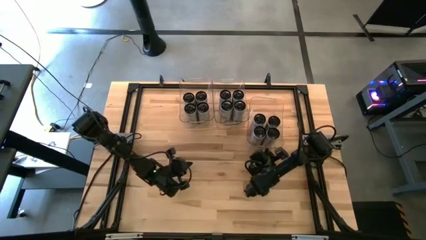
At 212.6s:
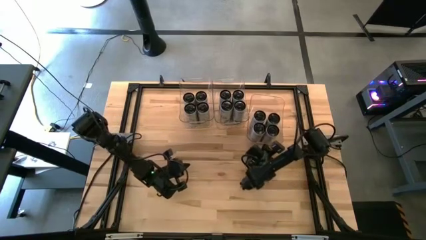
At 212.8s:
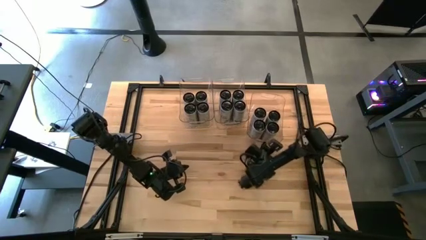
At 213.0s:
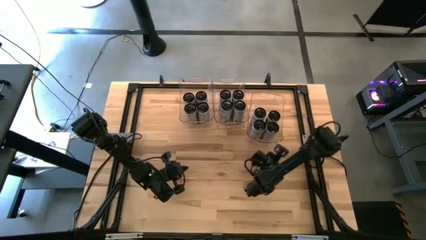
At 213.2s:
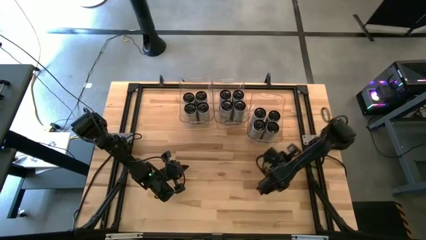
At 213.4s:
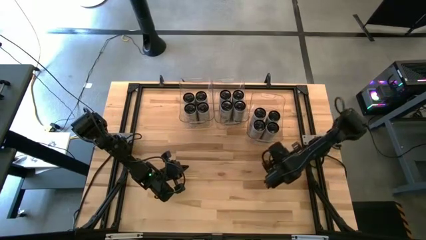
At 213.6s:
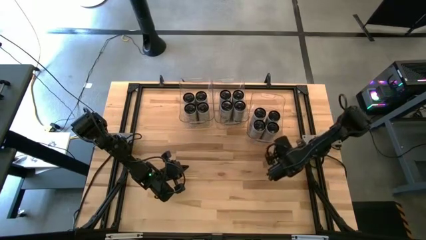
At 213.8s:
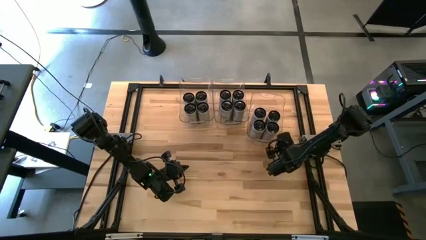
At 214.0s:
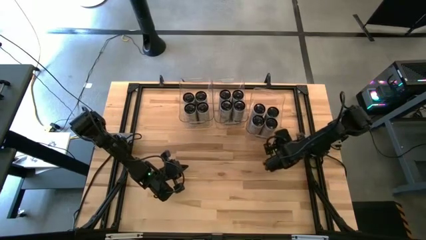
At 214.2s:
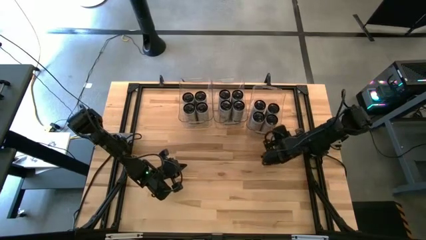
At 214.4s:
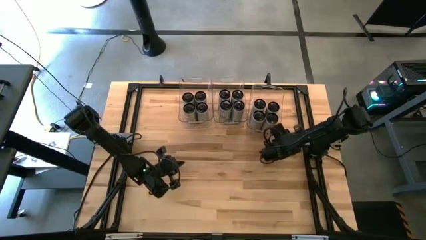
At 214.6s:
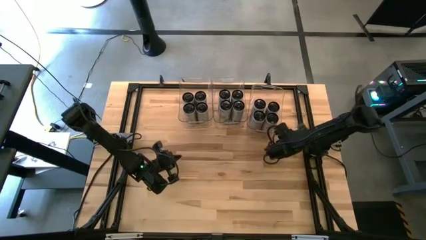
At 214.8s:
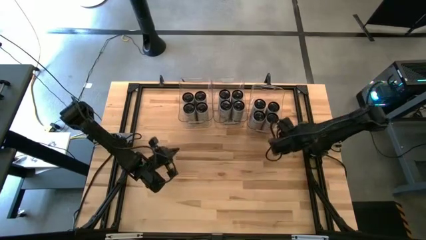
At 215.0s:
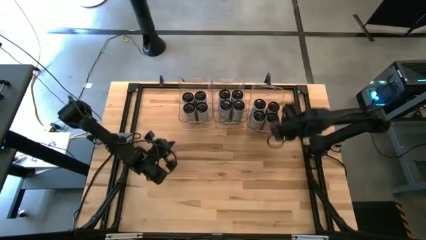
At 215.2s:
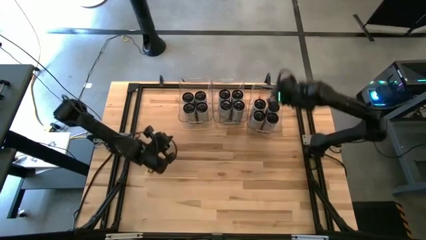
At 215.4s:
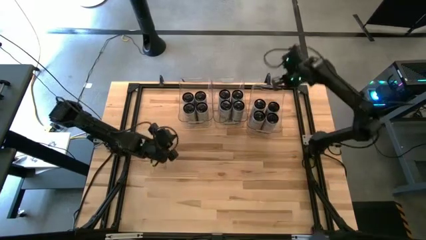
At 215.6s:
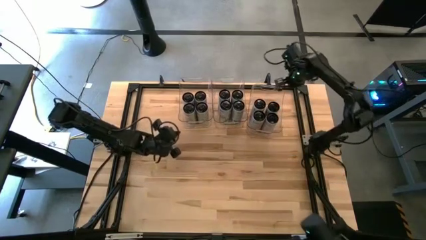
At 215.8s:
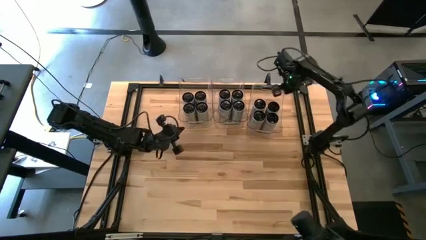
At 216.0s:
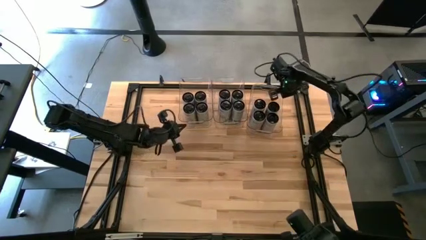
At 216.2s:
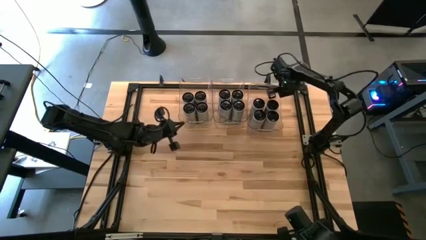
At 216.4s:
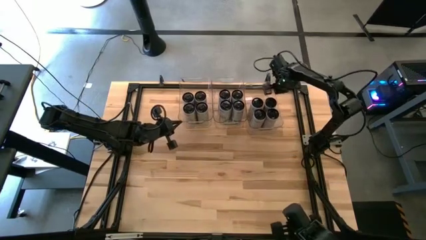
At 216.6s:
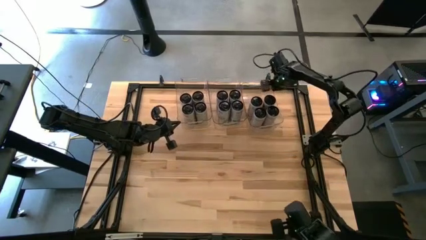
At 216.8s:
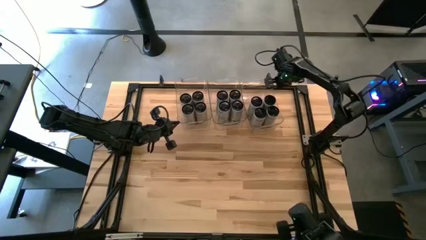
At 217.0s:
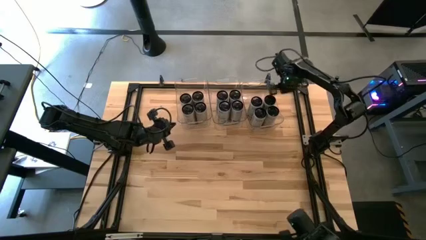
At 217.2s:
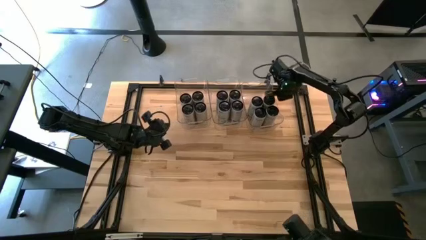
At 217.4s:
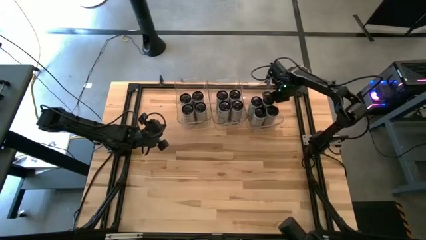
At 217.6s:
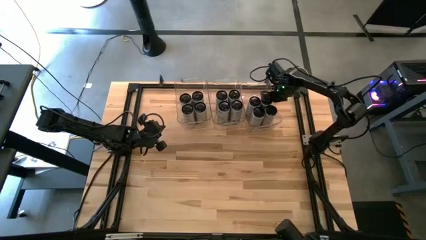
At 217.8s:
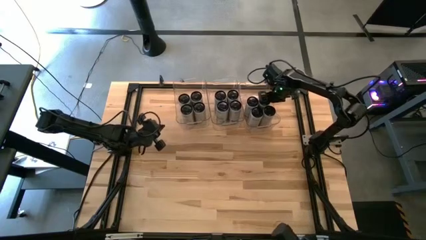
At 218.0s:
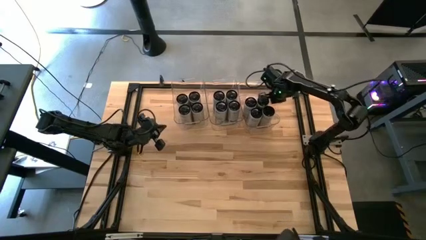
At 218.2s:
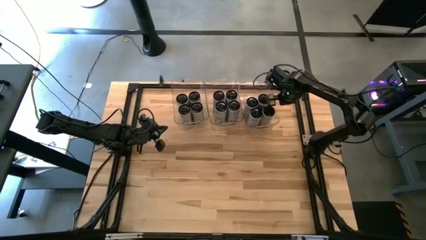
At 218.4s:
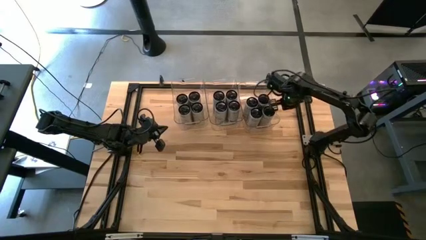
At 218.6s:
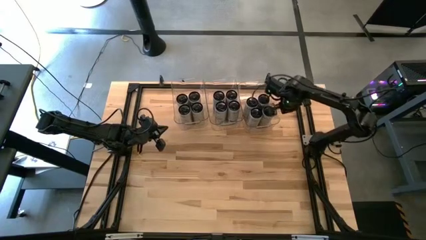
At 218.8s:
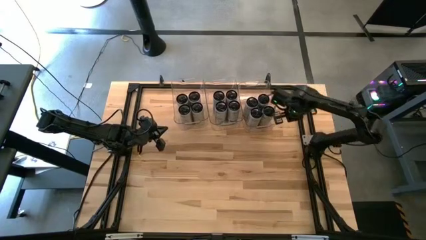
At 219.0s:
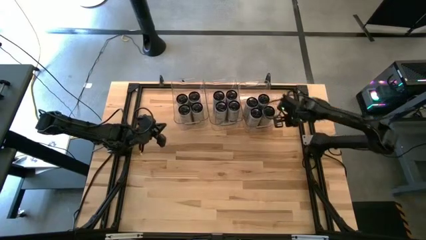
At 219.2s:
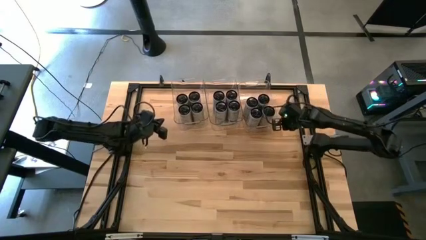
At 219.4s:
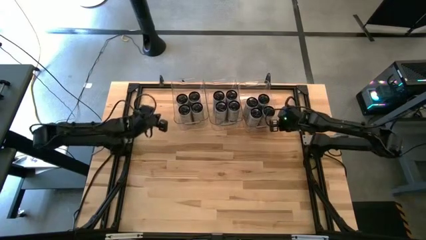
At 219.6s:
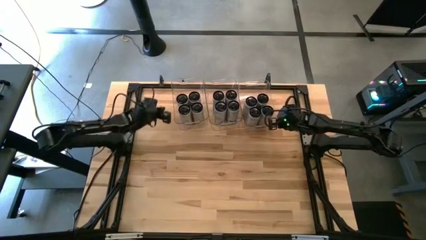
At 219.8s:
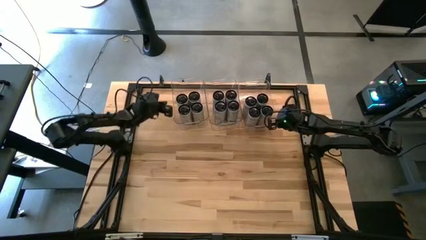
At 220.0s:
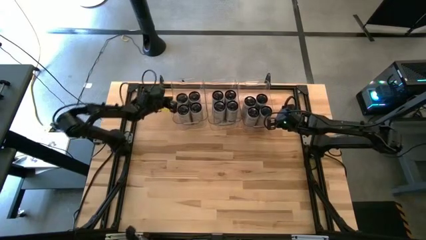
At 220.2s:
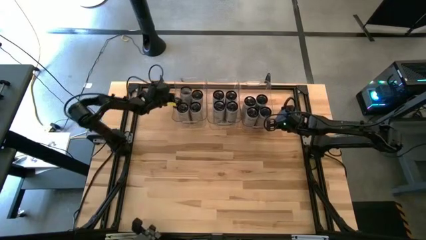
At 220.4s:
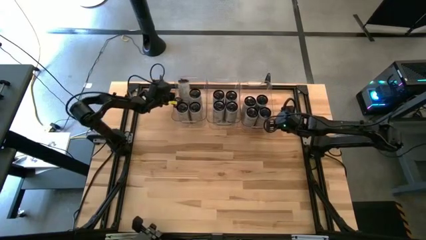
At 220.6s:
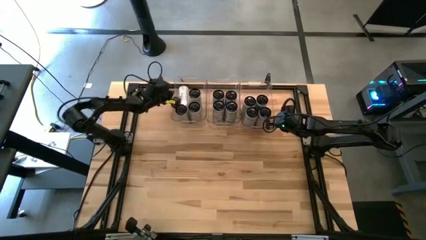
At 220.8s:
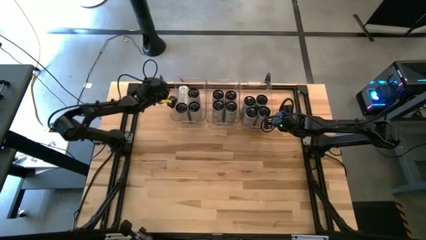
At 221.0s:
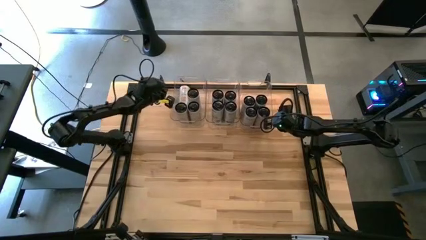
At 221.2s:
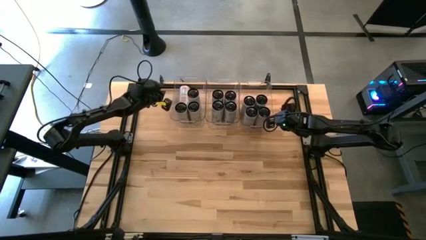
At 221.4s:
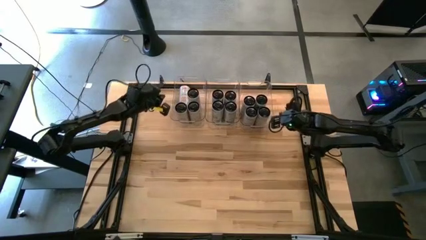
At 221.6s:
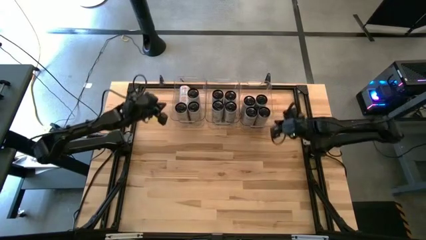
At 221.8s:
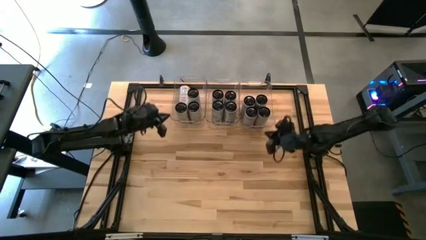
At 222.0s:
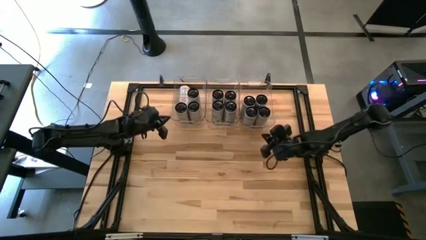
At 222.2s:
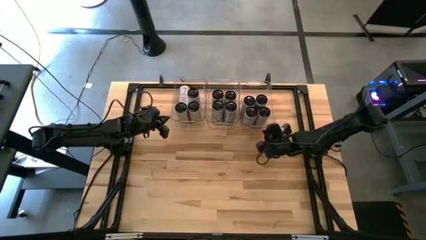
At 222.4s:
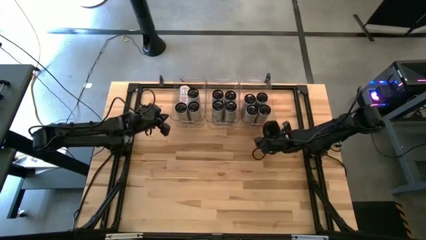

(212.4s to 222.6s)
Task: Sort soda cans
Move the bottom right transparent bin to the top right of the table

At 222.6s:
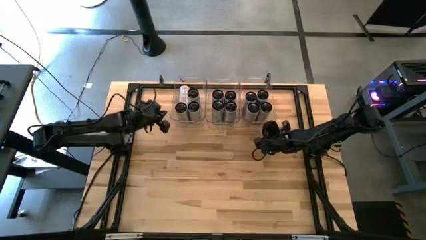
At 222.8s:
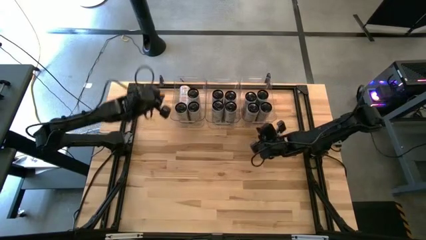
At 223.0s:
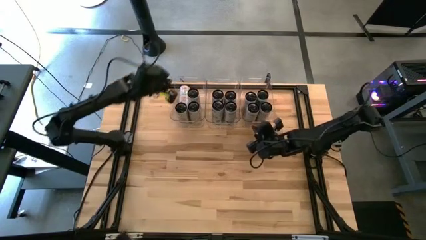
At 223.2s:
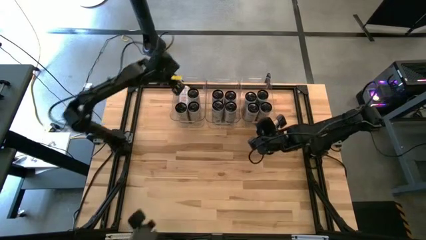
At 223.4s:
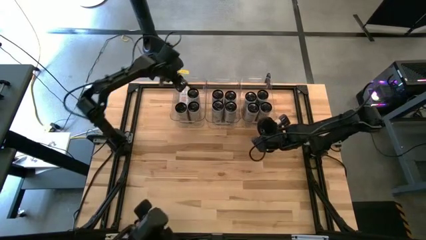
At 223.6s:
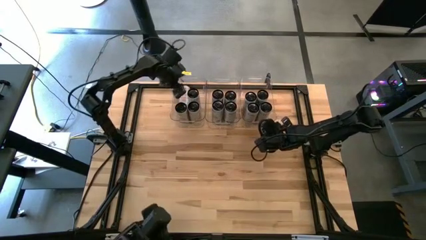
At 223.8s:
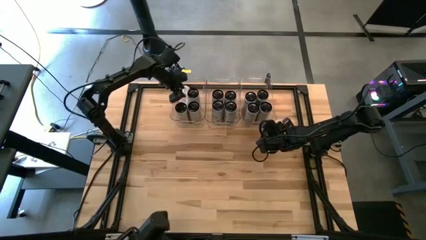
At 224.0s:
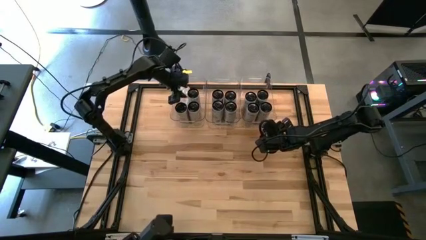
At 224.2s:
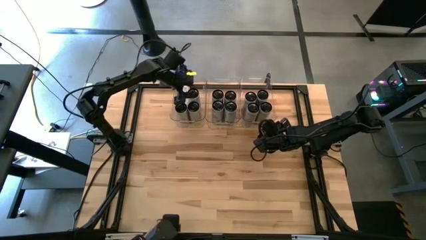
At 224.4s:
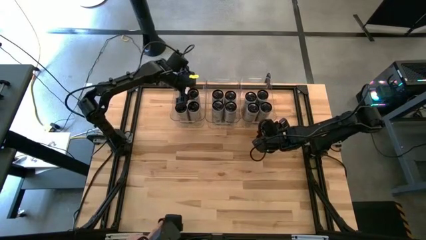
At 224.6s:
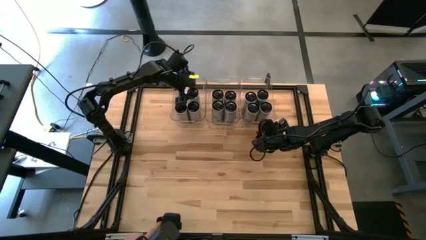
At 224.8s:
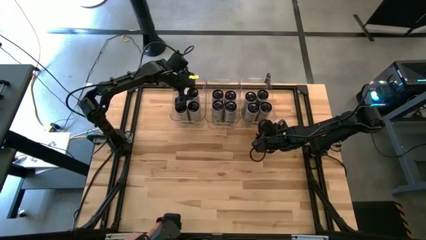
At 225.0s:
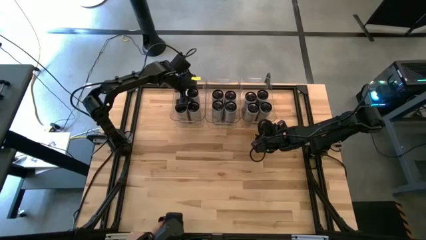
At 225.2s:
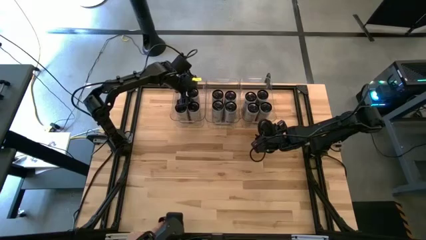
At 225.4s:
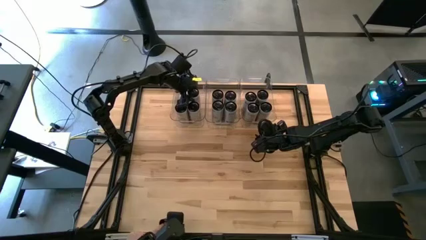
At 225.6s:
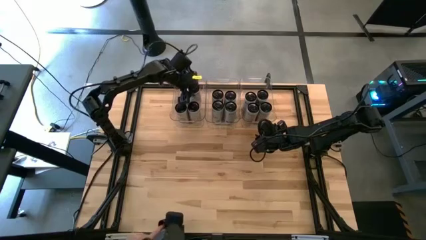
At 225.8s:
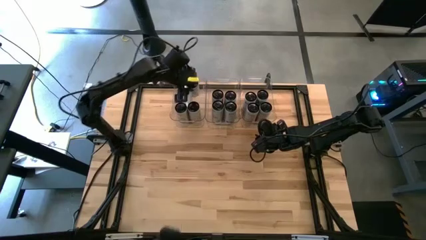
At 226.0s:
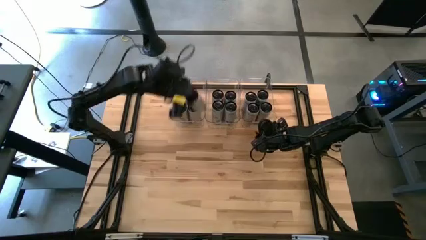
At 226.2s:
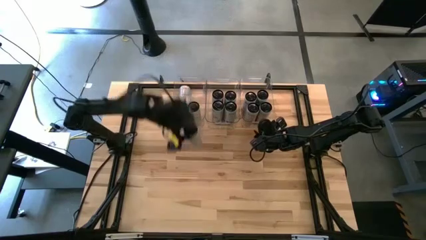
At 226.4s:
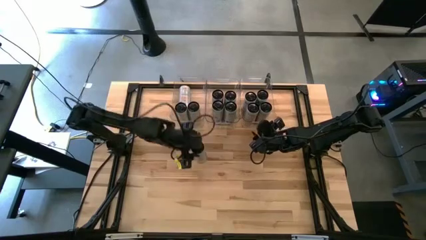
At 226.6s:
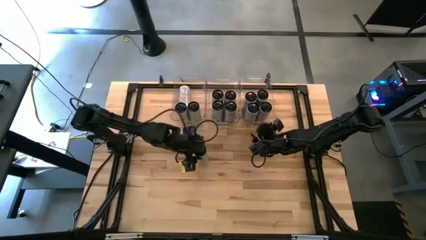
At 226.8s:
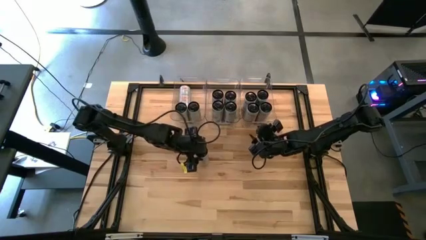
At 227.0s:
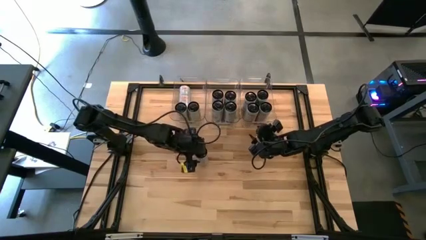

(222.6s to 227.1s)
Remove the white-yellow soda can from the top left transparent bin

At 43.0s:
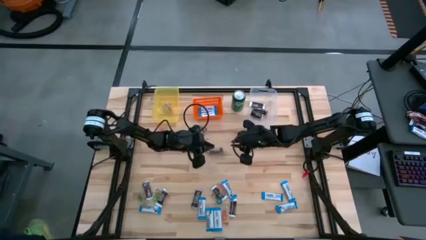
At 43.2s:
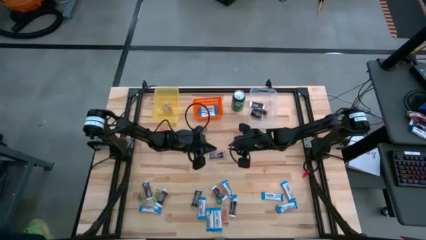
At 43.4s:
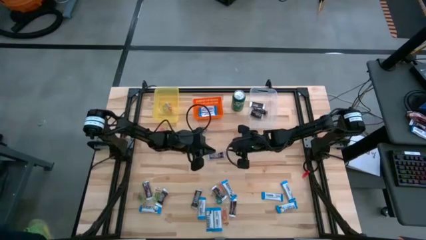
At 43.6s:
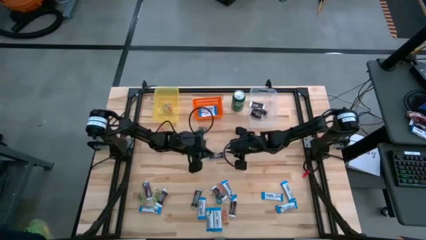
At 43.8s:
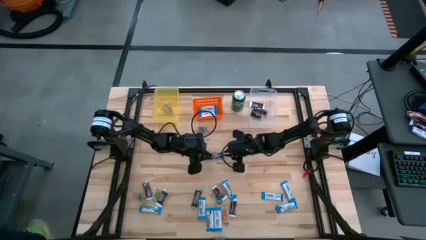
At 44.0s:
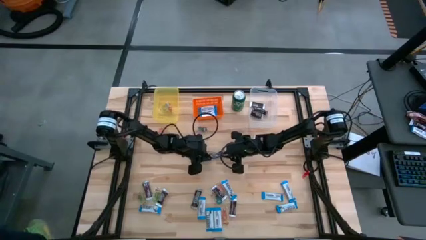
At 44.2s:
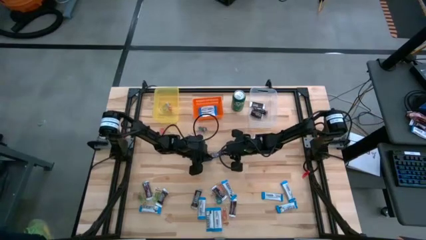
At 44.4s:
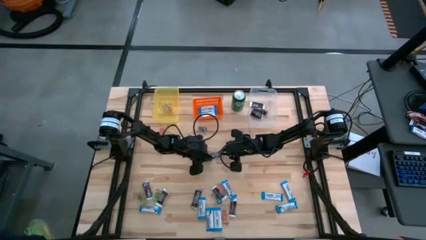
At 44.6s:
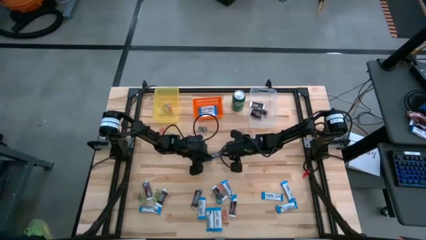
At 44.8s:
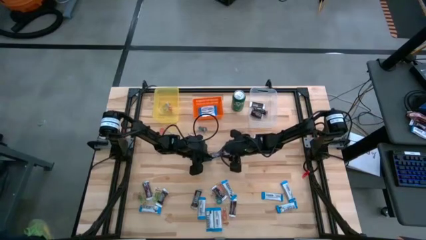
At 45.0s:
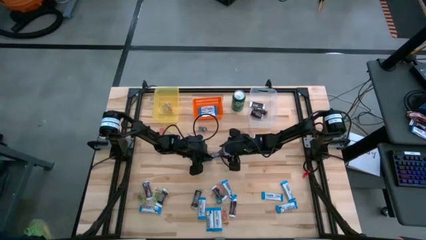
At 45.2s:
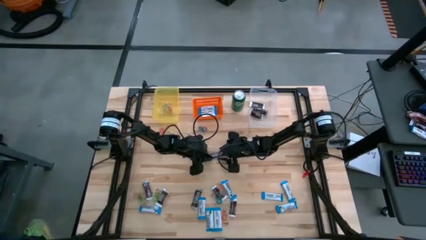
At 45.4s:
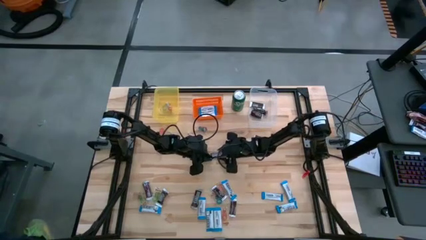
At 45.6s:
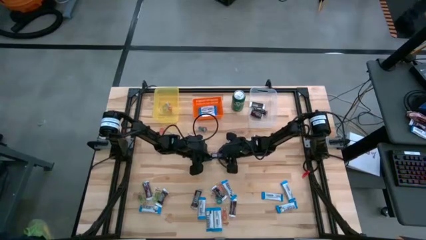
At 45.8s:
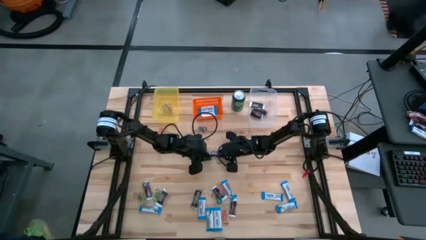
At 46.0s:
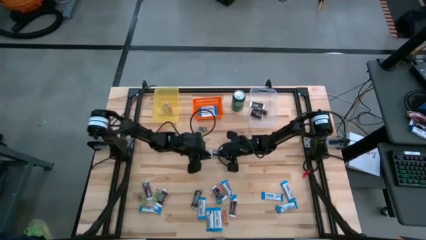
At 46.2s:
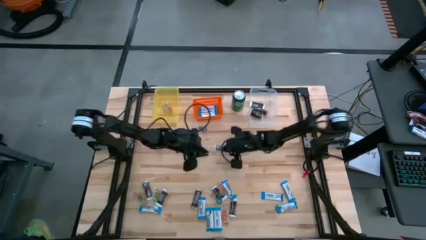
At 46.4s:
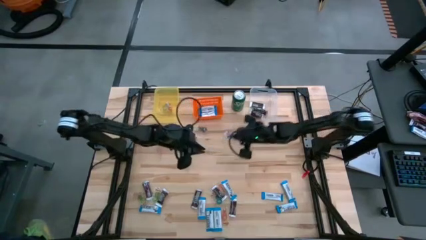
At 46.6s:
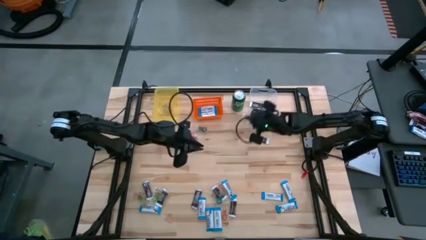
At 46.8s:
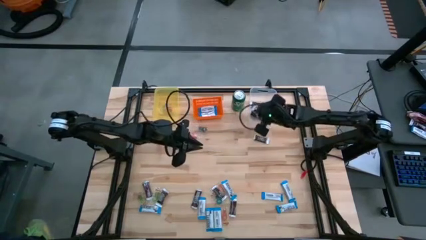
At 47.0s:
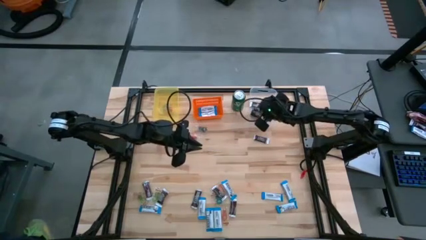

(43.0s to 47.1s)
Task: Organize candy in baskets
Put the brown chocolate into the transparent bin
